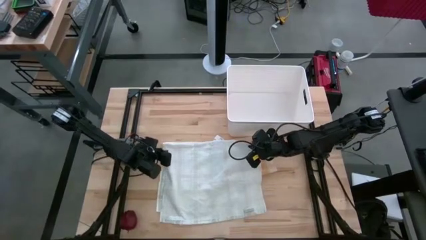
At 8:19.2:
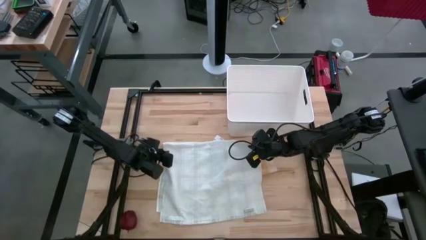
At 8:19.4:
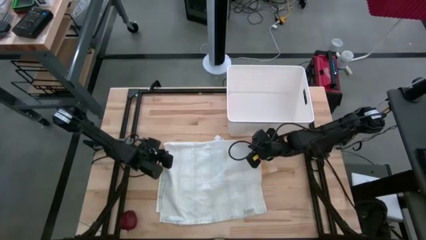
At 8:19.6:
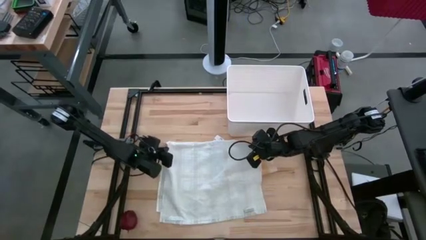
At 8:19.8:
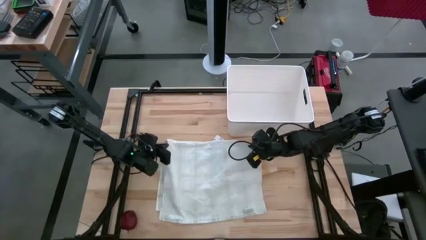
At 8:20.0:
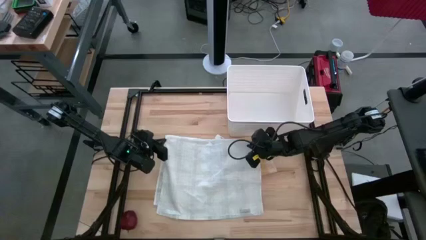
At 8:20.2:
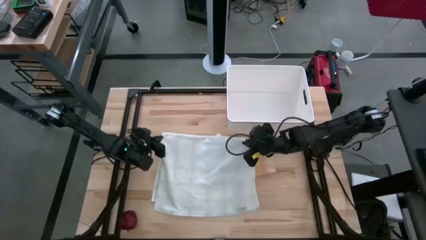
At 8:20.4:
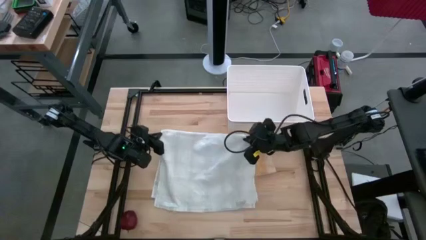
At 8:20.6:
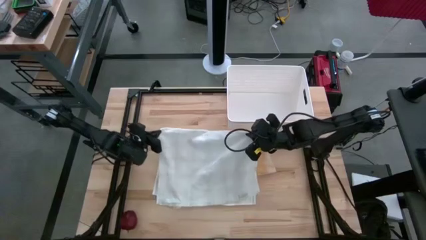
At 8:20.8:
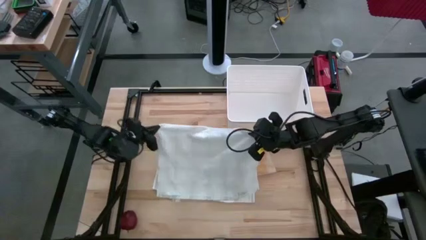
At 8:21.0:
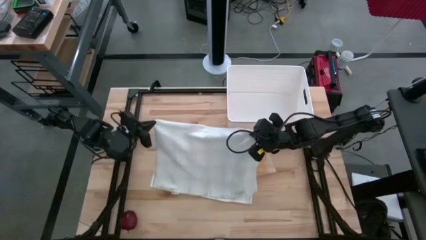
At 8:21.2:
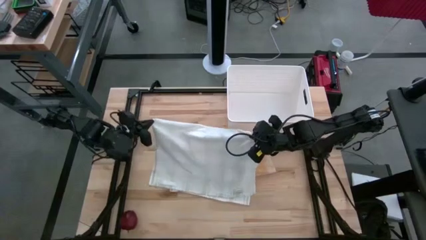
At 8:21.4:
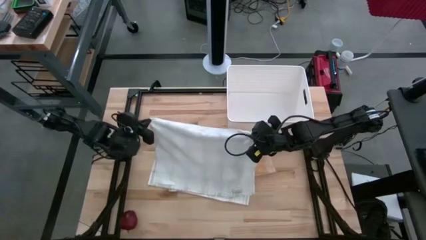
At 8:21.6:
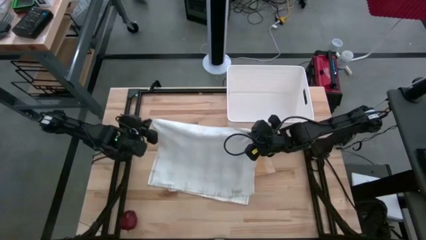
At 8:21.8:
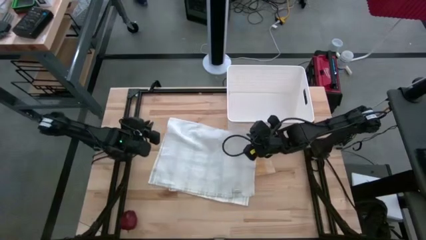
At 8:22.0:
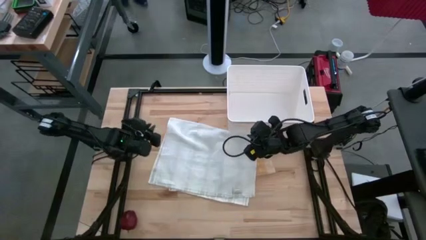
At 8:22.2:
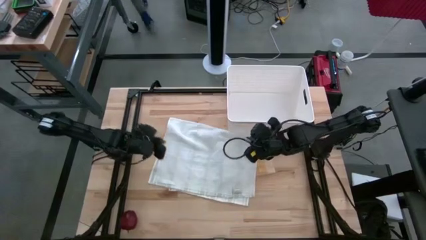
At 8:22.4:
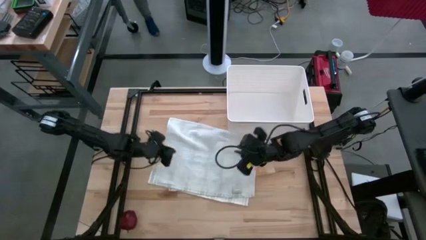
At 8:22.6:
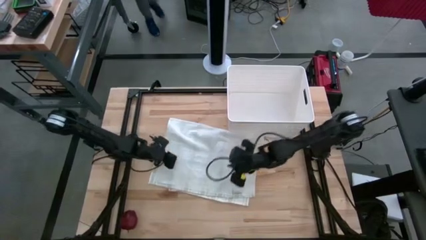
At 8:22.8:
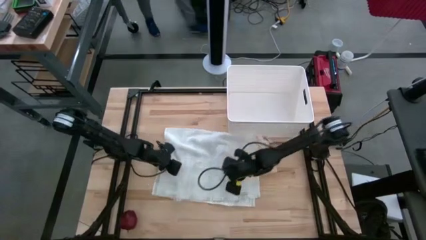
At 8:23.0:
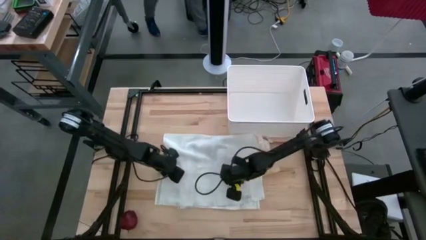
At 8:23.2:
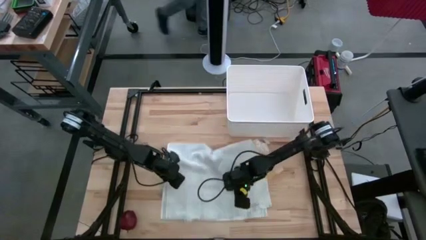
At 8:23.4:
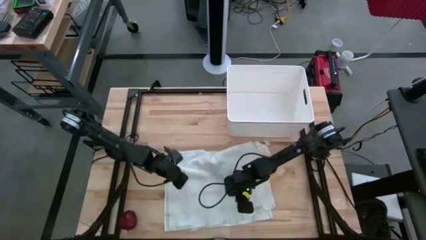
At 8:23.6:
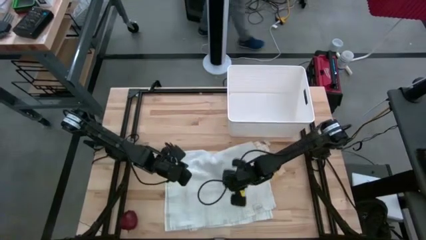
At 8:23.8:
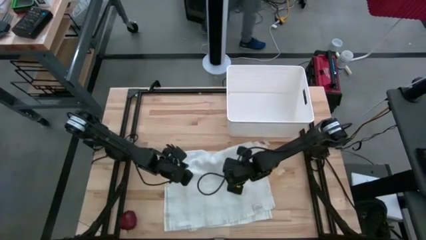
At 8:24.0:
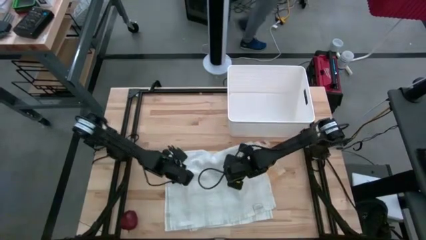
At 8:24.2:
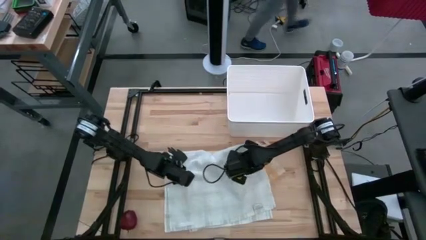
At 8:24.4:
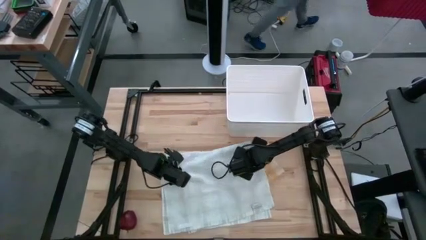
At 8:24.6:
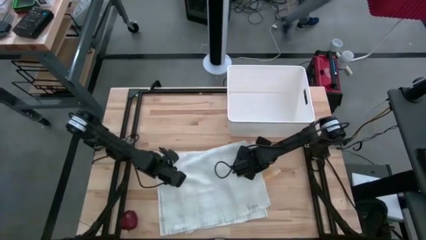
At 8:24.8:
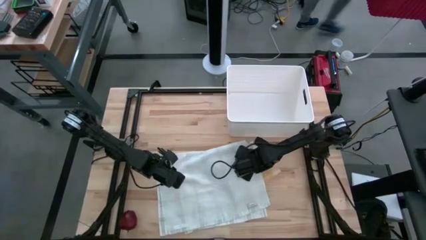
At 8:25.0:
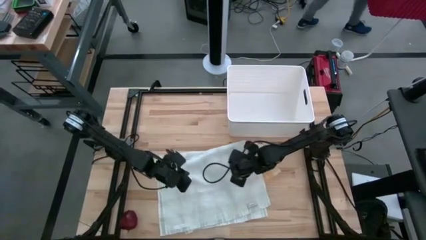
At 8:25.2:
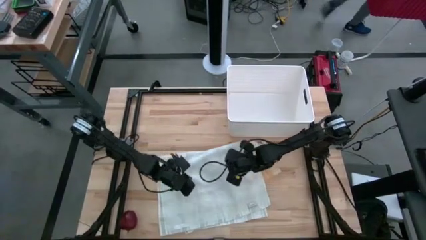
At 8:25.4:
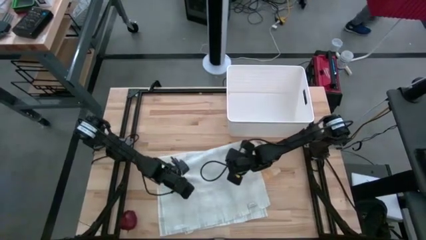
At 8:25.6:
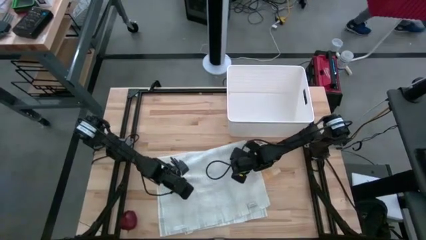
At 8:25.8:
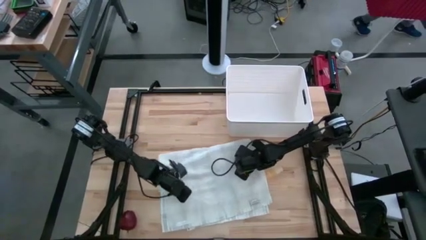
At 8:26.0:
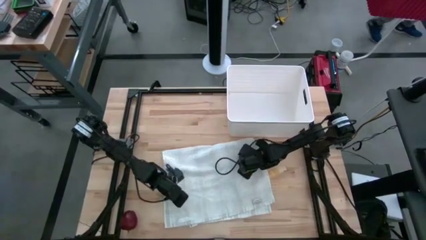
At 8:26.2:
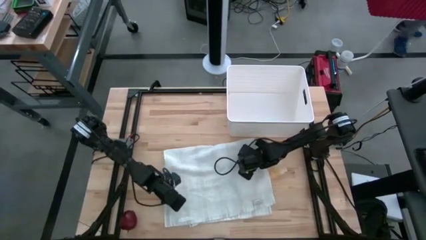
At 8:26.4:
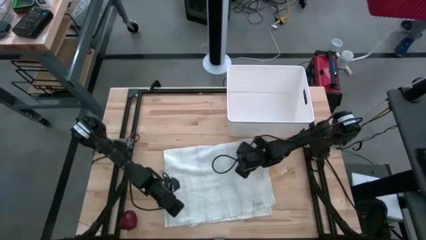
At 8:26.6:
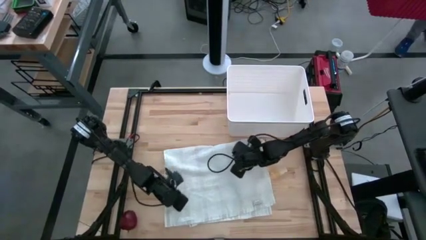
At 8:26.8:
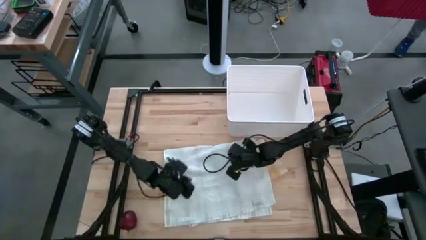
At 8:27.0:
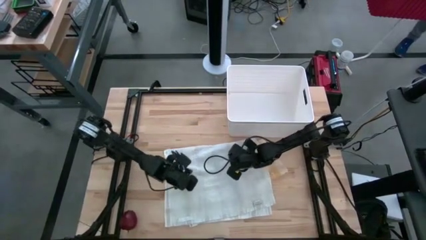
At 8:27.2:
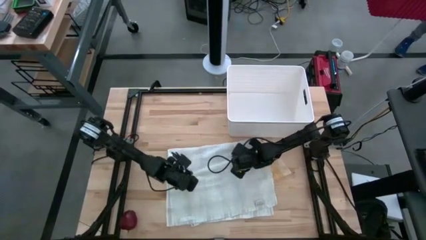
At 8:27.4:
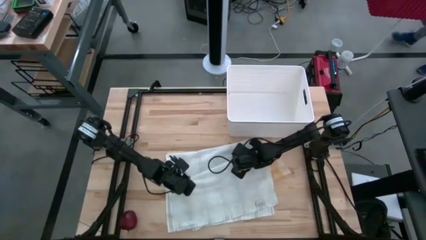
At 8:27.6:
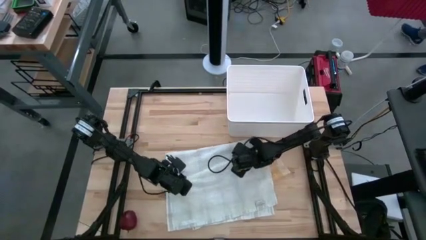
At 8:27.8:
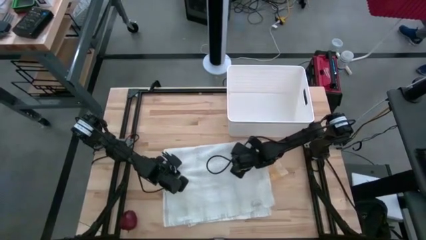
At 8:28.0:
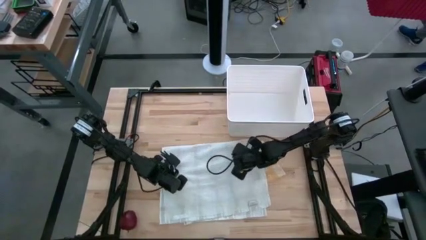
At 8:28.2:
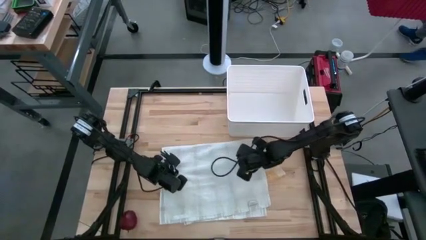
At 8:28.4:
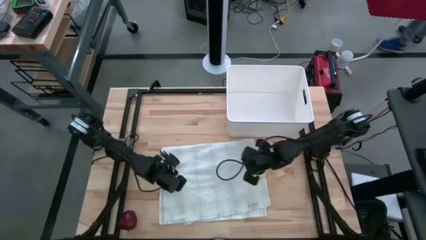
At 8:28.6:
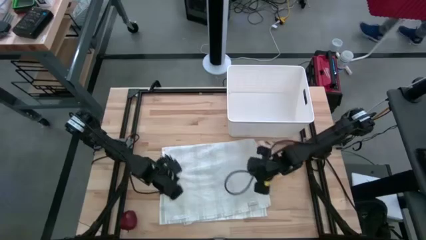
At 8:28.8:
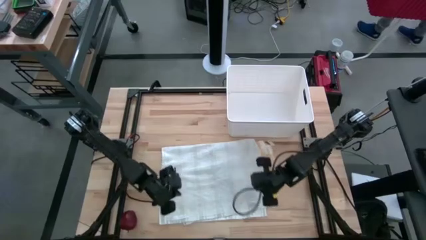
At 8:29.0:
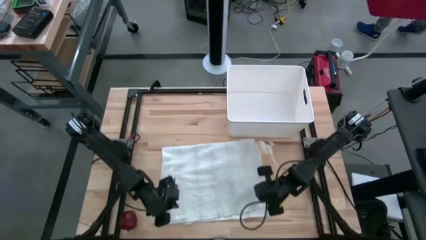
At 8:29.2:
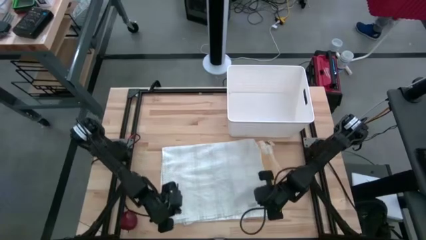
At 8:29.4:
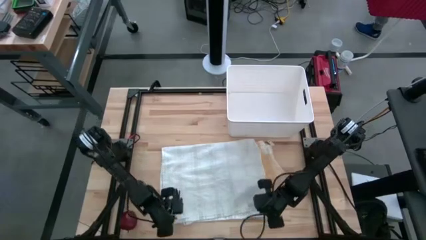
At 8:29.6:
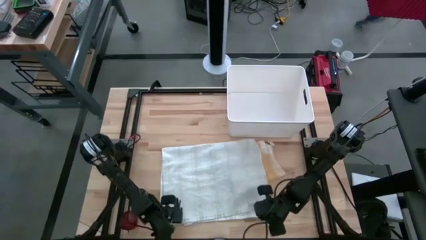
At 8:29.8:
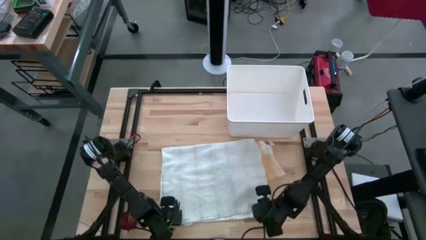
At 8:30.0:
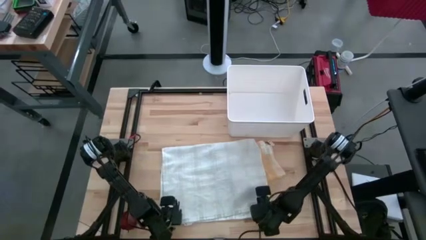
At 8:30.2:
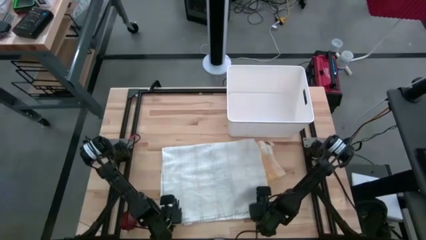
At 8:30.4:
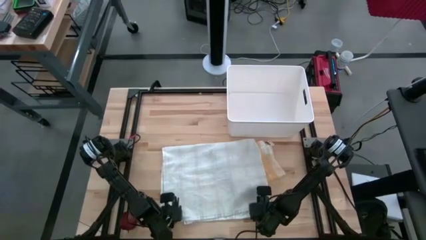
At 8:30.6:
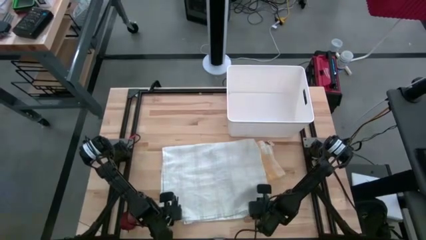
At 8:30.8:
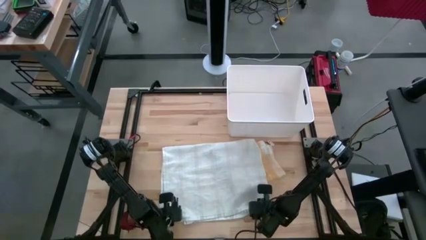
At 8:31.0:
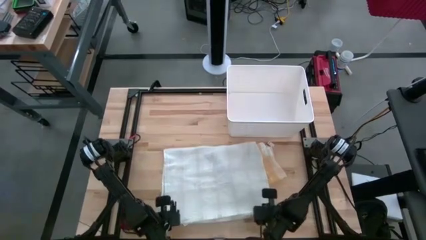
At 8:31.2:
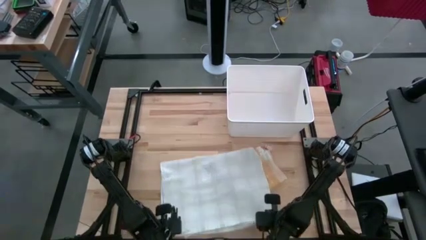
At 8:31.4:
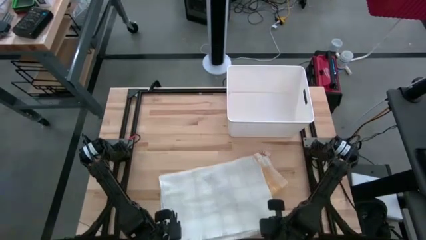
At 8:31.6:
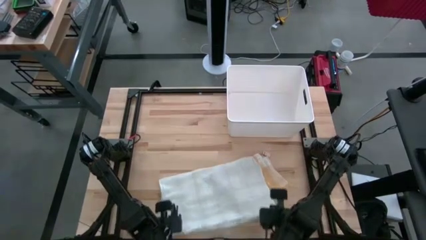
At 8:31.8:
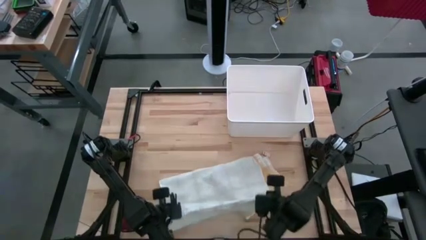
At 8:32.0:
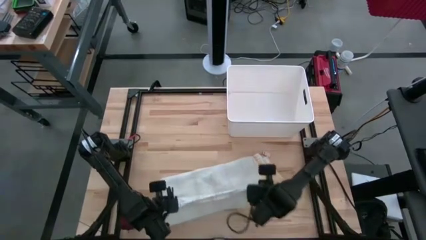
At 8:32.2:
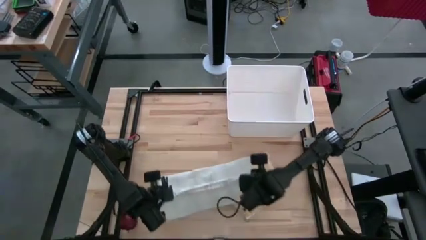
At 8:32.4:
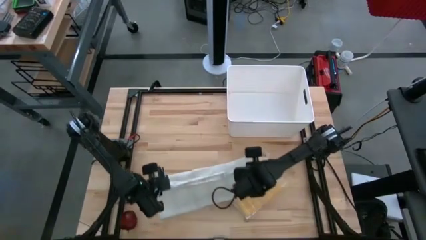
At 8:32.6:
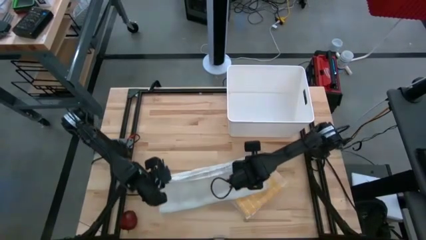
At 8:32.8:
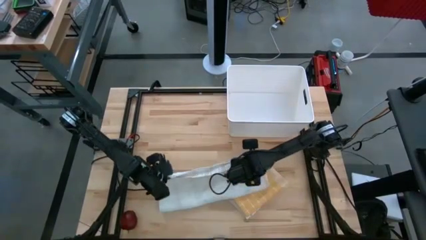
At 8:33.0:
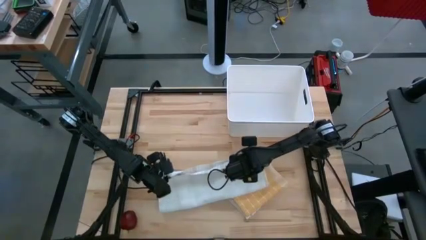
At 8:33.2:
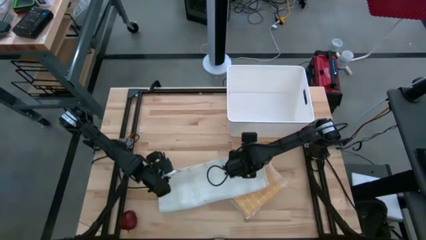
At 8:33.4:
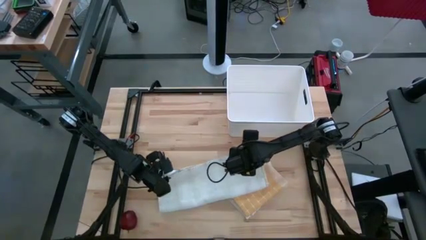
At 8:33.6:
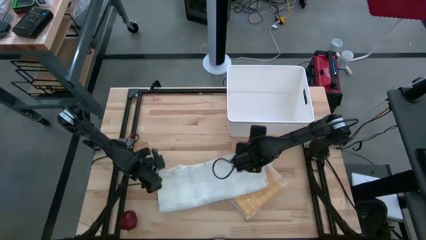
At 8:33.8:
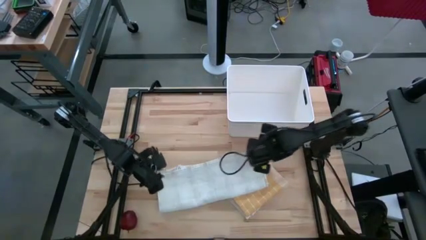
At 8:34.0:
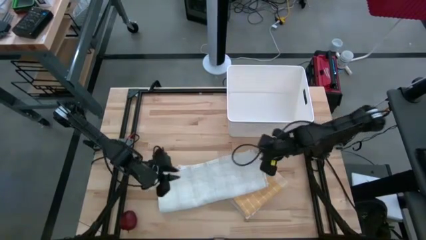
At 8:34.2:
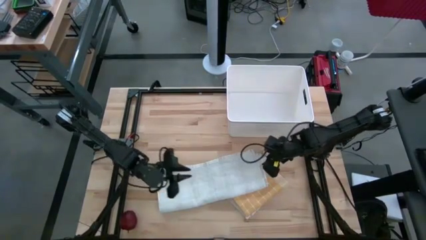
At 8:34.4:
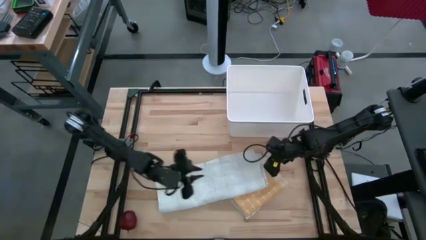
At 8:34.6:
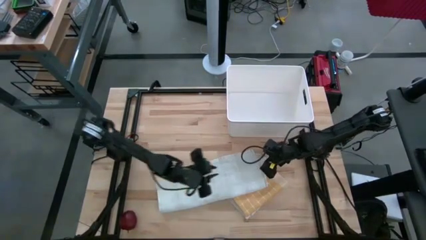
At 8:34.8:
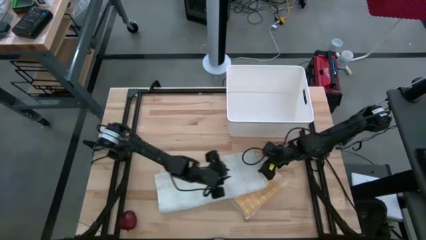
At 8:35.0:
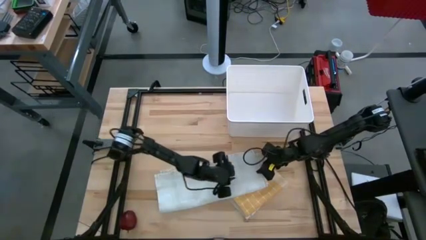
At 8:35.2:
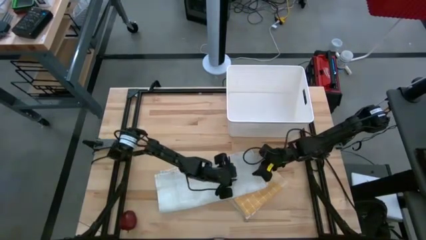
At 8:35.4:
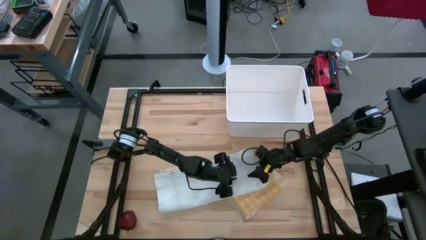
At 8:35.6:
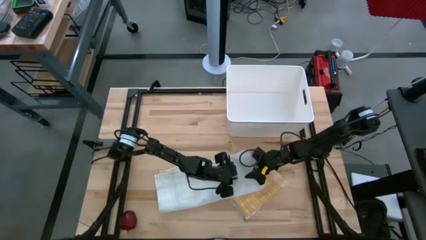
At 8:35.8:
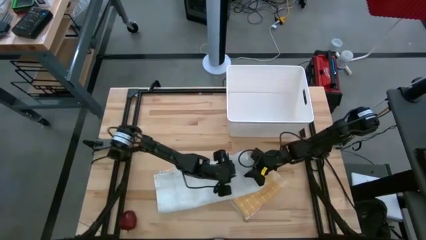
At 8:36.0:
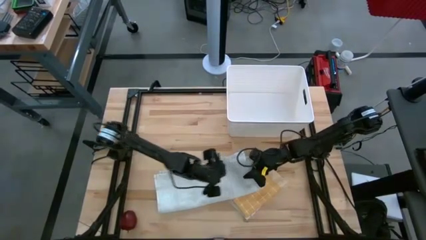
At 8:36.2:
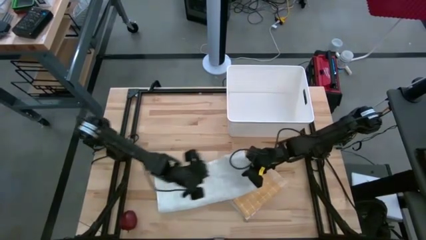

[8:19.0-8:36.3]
Task: Fold towel
Fold the white checkered towel
